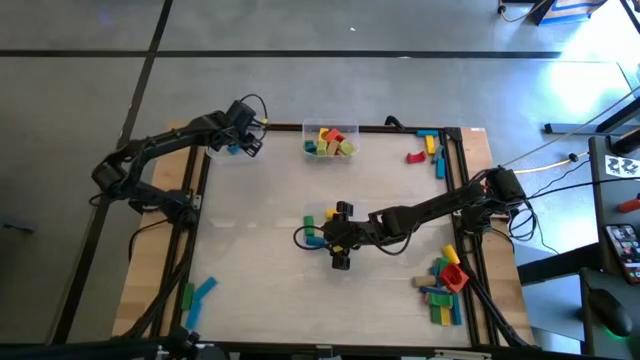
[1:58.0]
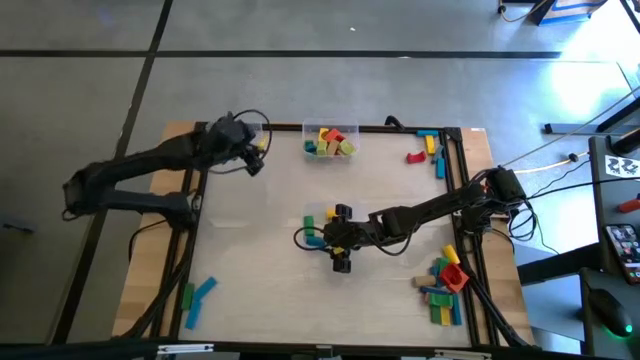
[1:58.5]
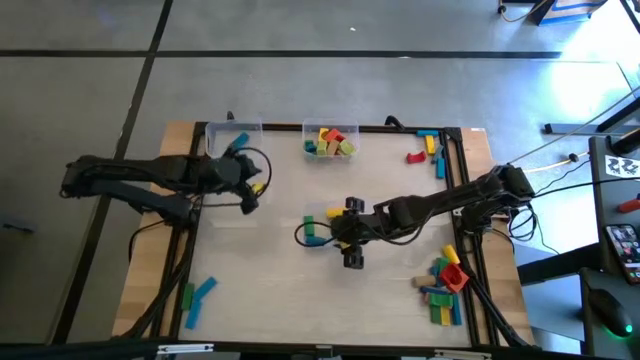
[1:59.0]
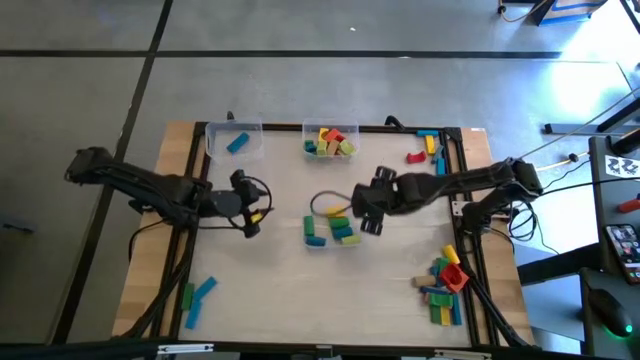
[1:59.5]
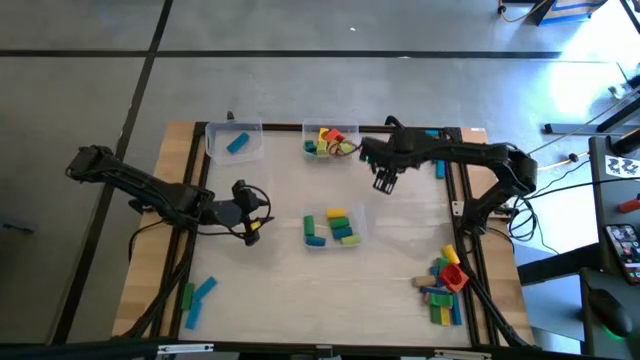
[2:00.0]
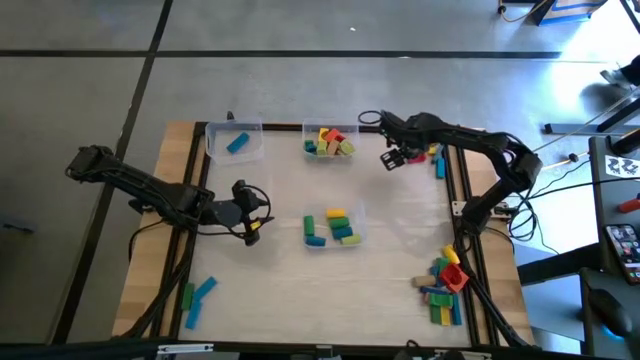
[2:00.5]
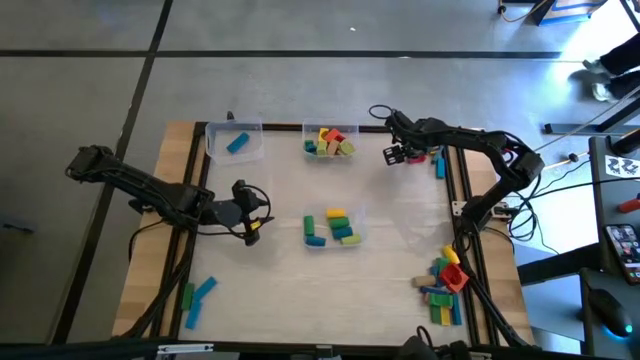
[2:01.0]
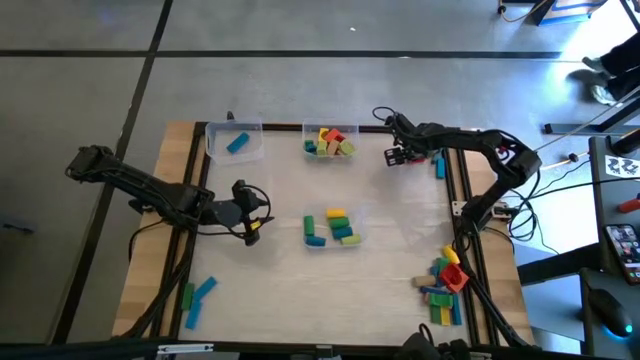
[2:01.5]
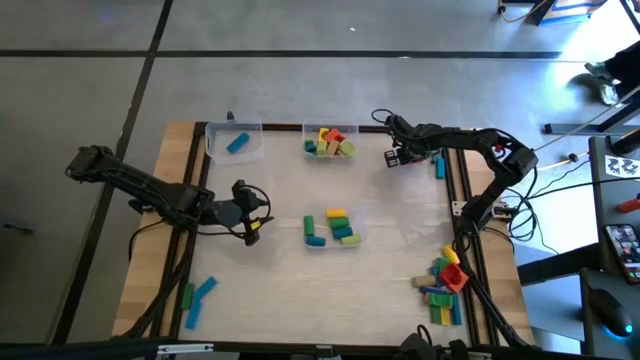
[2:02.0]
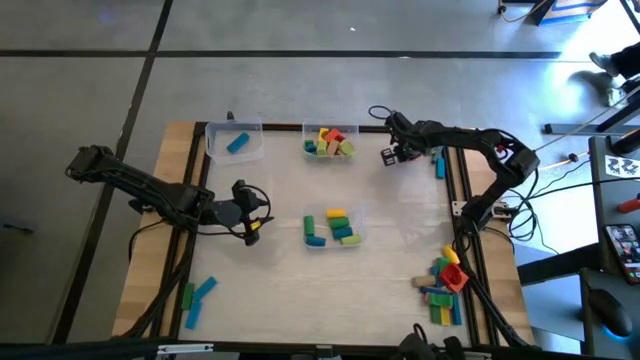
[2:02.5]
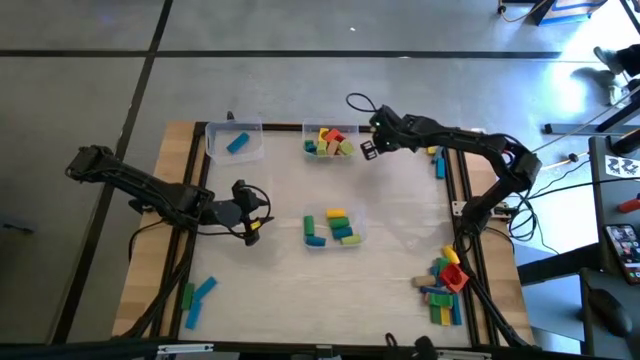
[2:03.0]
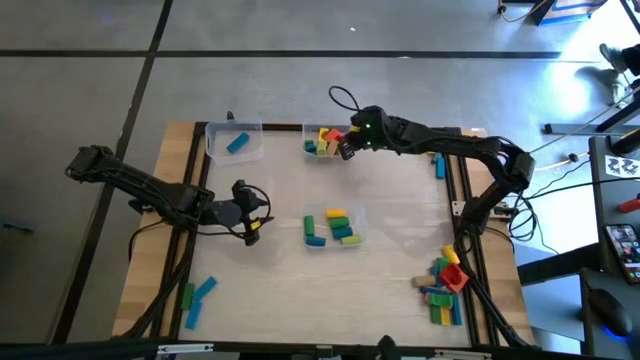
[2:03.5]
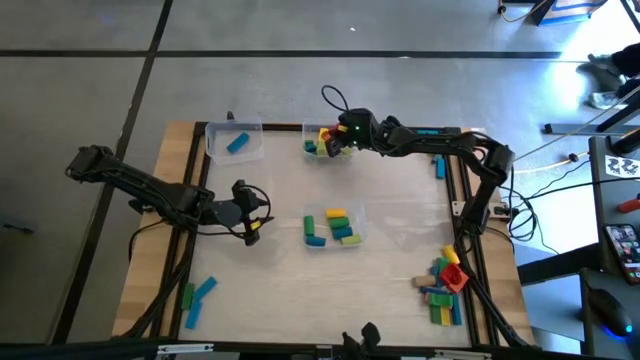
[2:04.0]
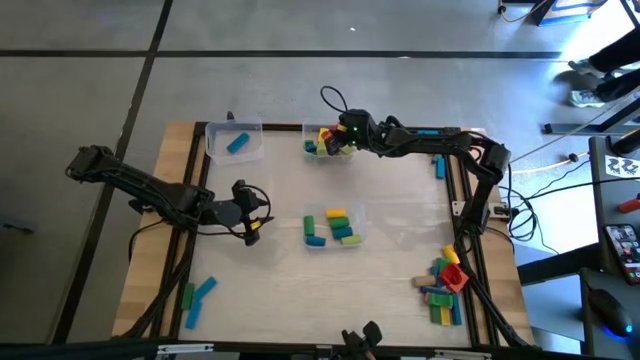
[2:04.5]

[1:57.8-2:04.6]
Task: Sort blocks by size
Put the red arch block into the top right transparent bin

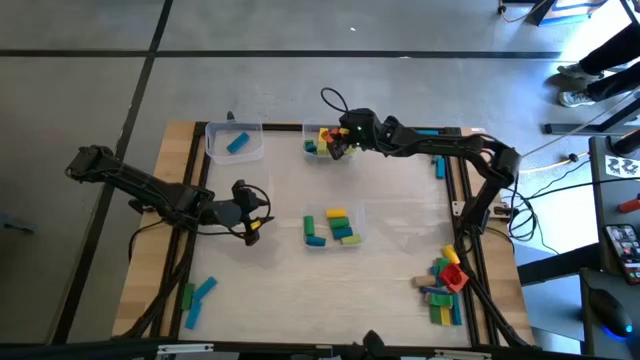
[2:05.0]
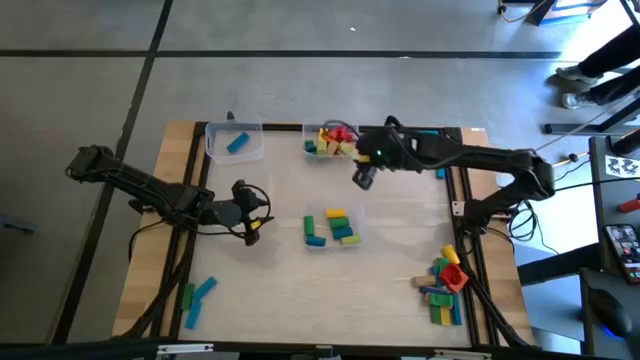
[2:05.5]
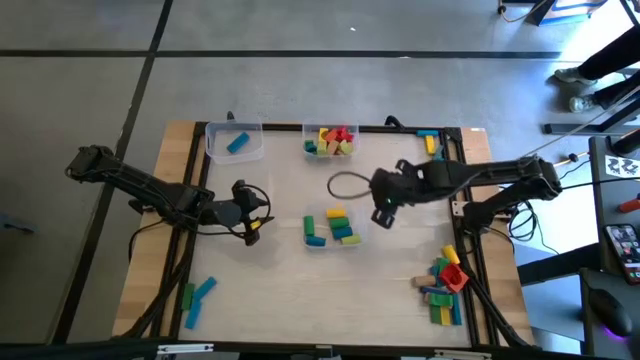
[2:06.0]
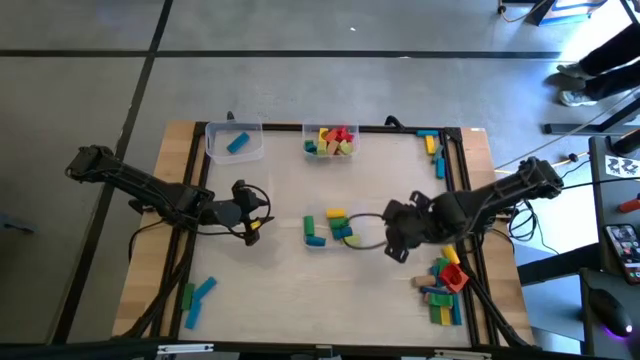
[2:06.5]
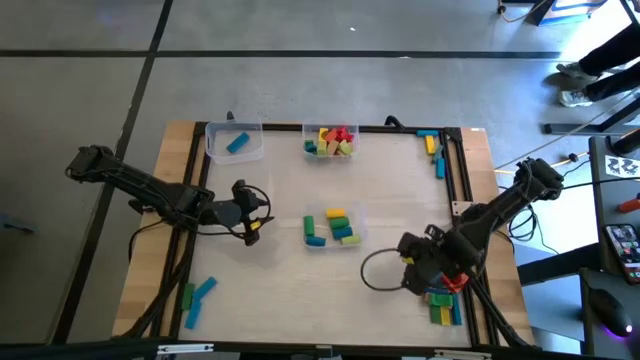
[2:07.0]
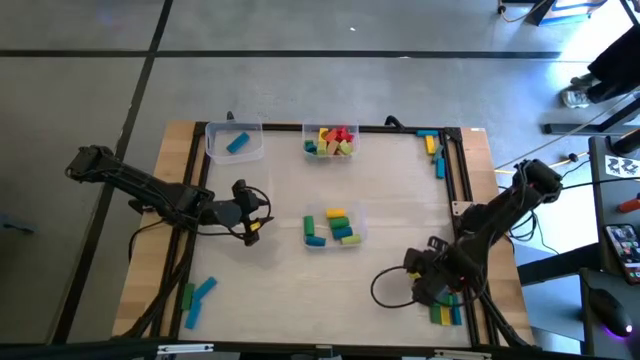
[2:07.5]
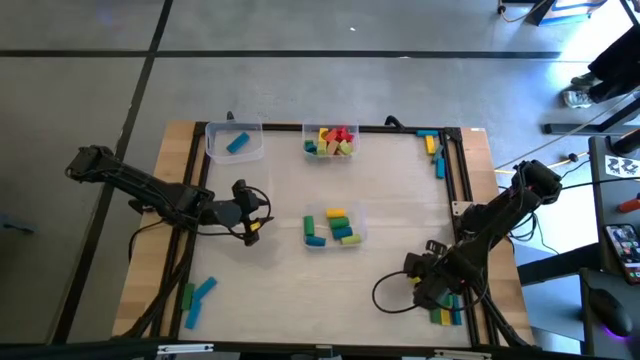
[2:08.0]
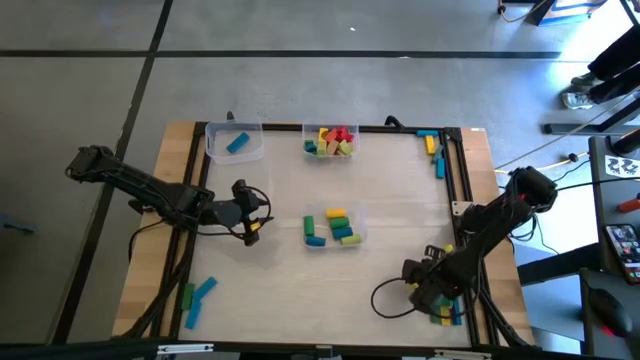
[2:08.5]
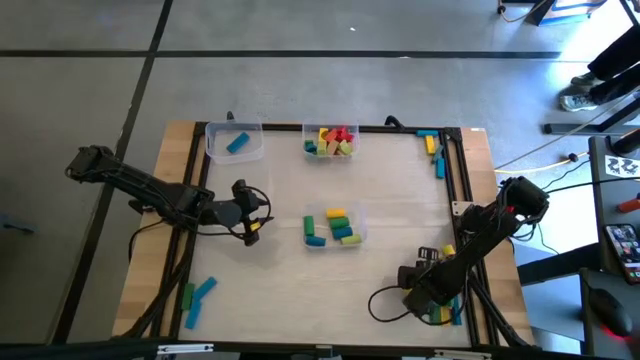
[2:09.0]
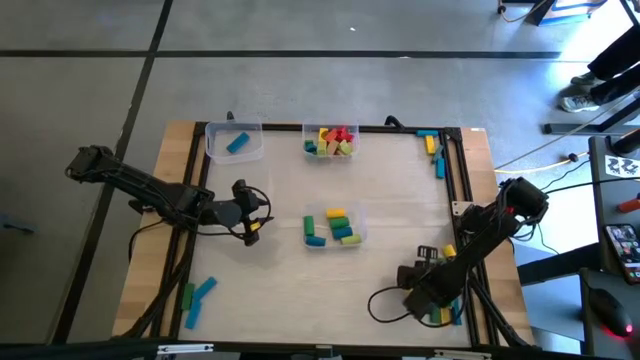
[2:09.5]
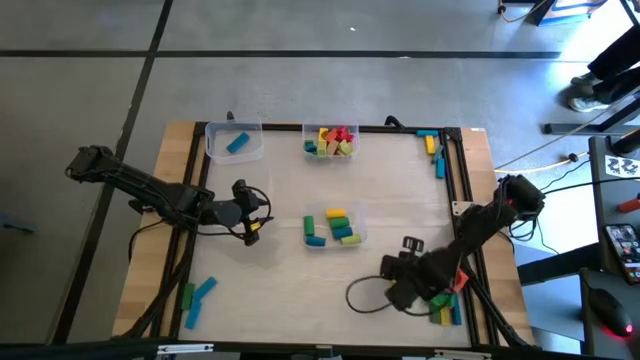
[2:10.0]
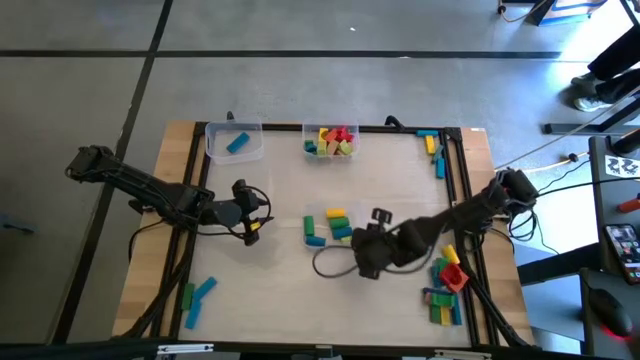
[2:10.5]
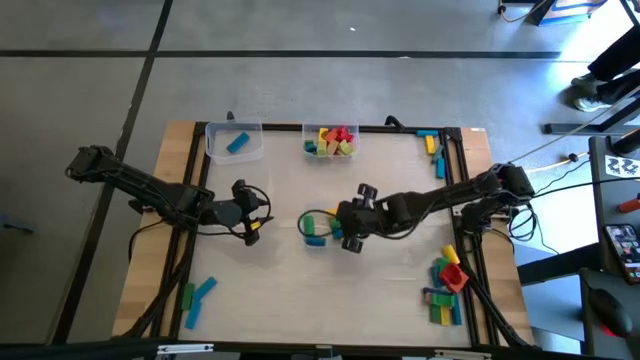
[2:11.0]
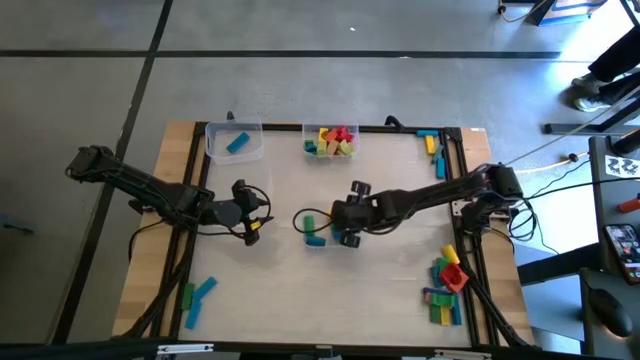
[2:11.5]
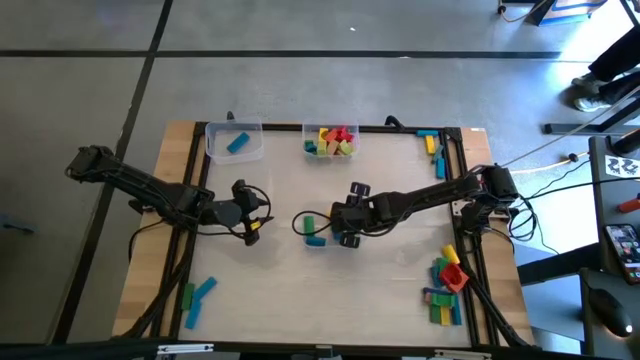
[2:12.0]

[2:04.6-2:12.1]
Put the brown cylindrical block into the bottom transparent bin

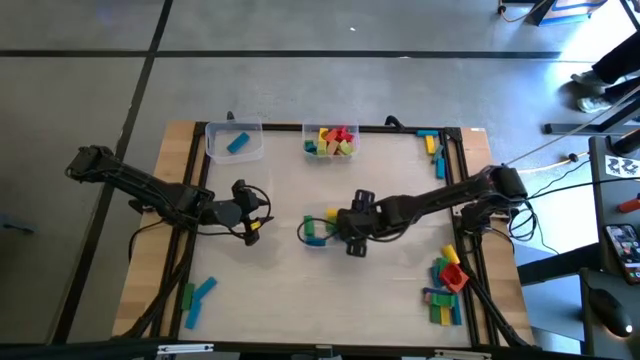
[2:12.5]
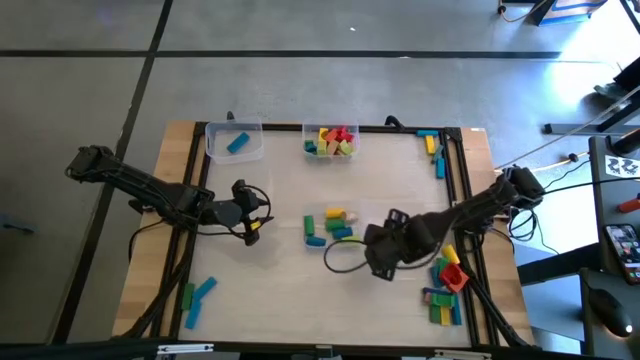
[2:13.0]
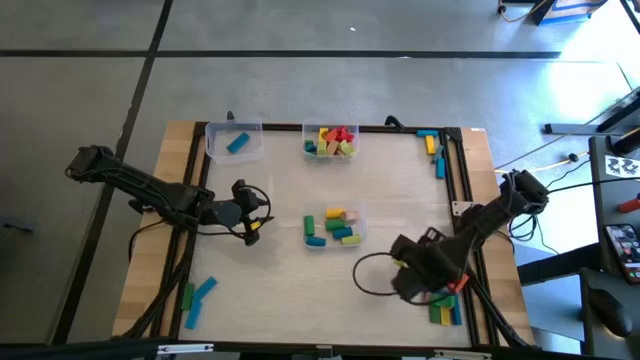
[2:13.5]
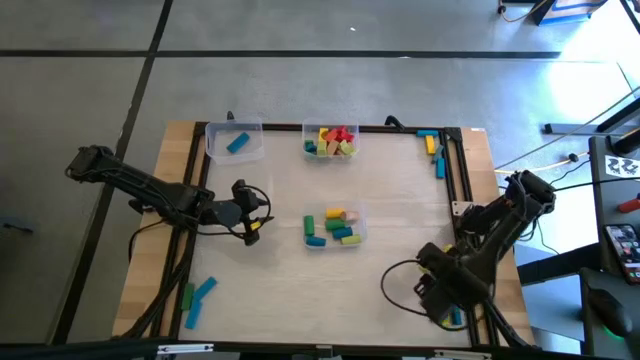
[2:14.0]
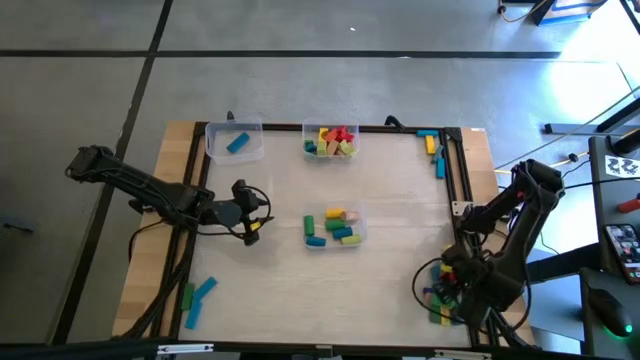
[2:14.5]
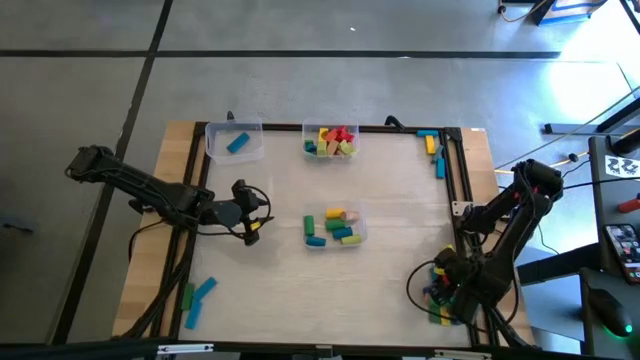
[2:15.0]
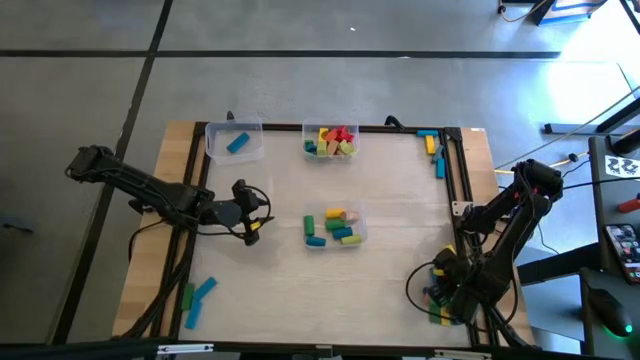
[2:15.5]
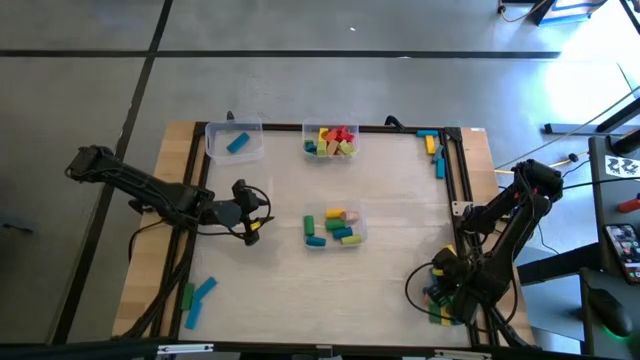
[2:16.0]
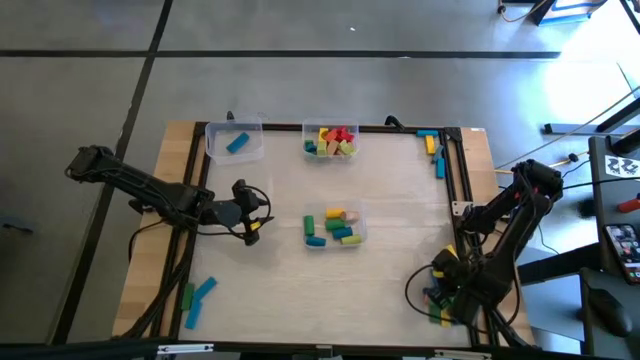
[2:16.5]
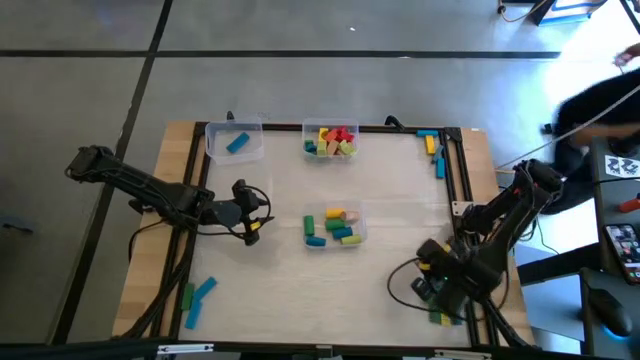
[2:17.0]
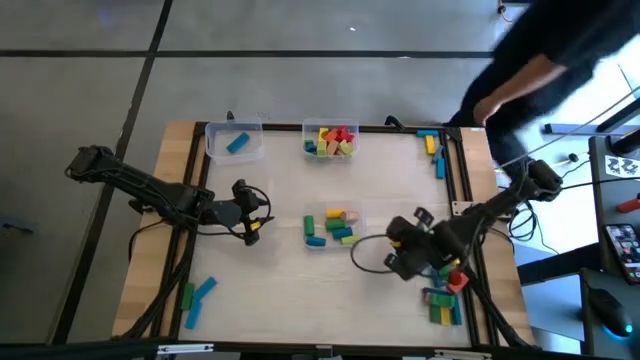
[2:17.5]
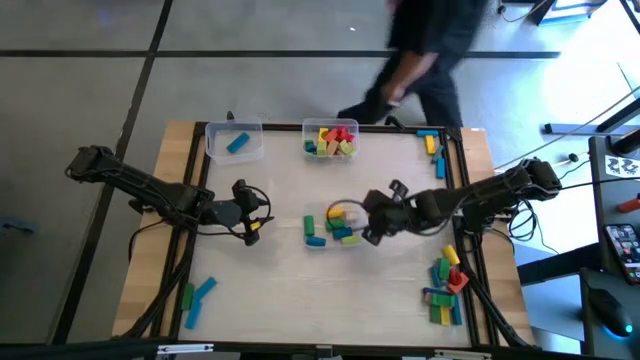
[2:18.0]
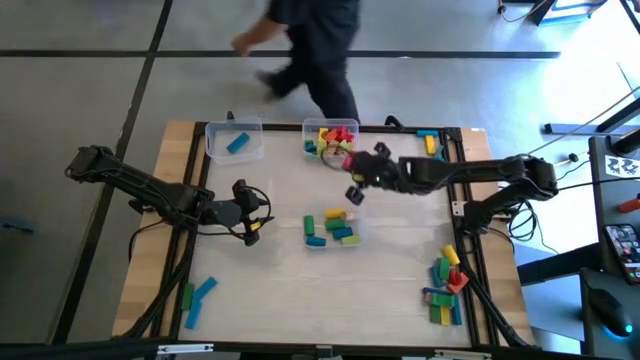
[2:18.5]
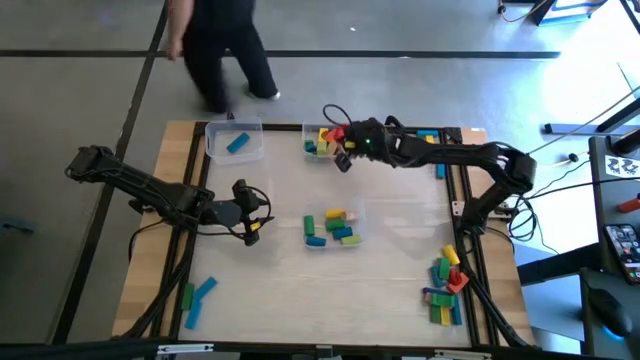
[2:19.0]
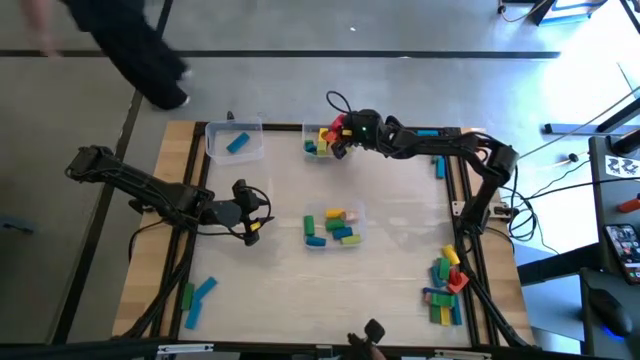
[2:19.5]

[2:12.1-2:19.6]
Put the red arch block into the top right transparent bin
